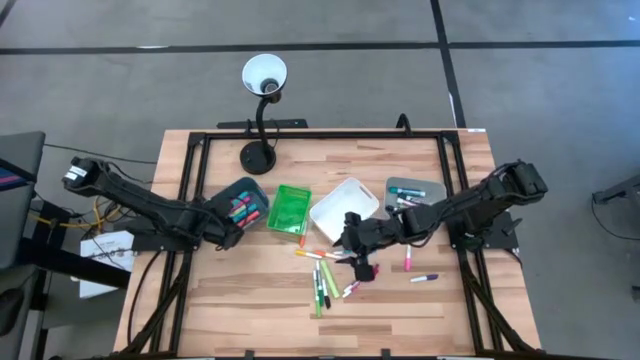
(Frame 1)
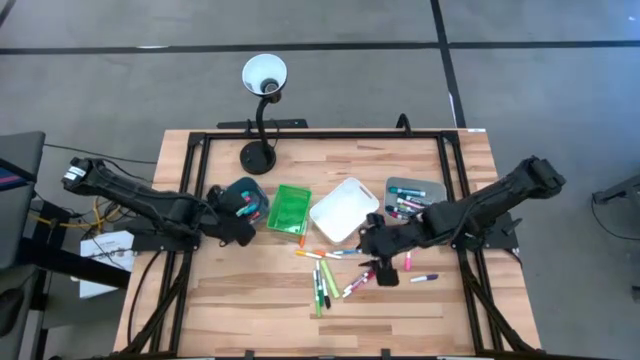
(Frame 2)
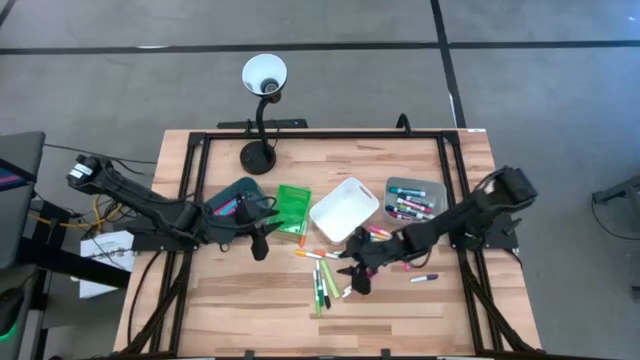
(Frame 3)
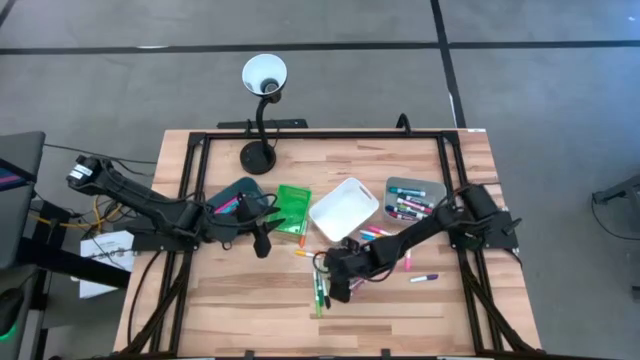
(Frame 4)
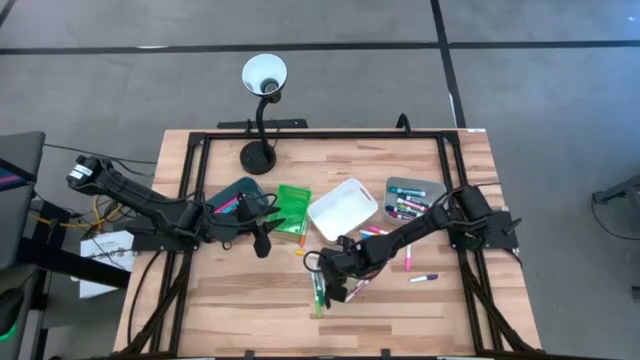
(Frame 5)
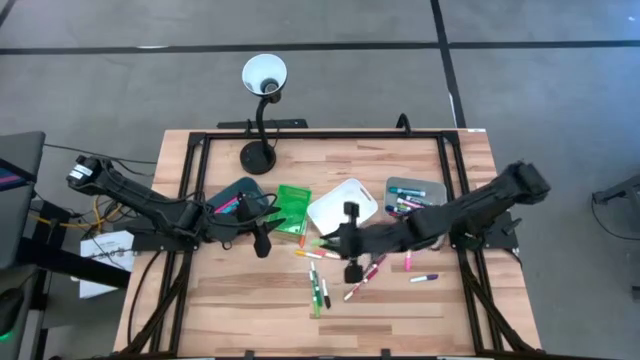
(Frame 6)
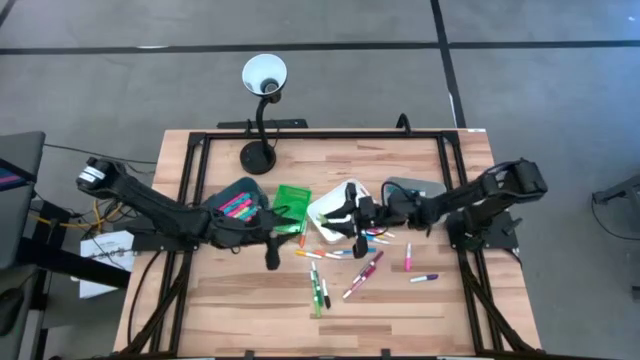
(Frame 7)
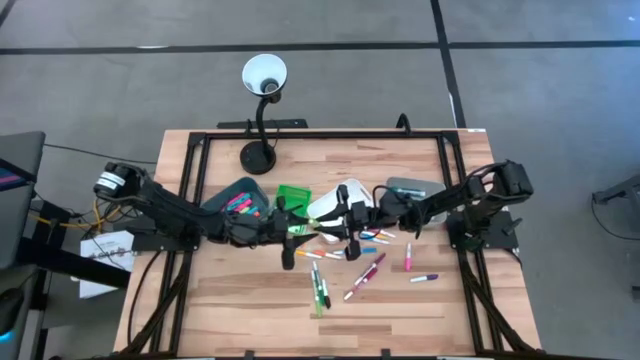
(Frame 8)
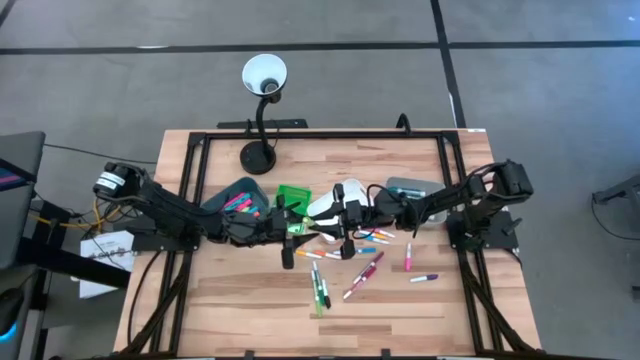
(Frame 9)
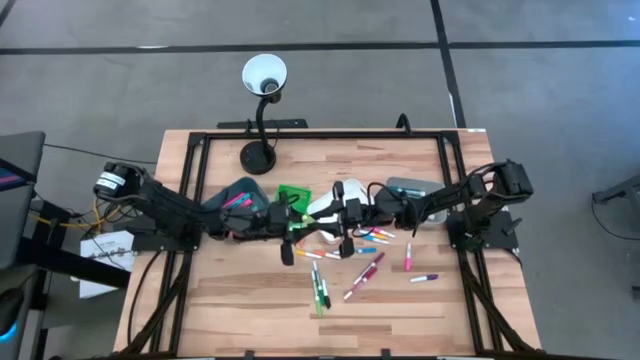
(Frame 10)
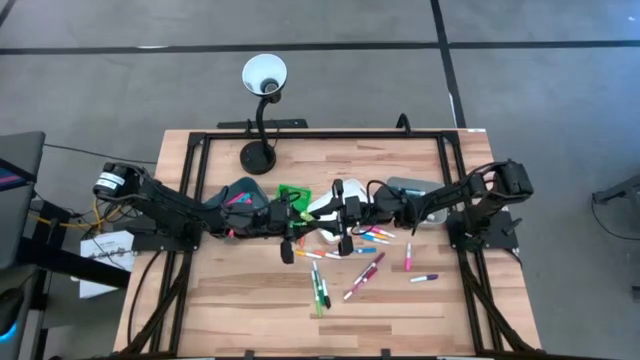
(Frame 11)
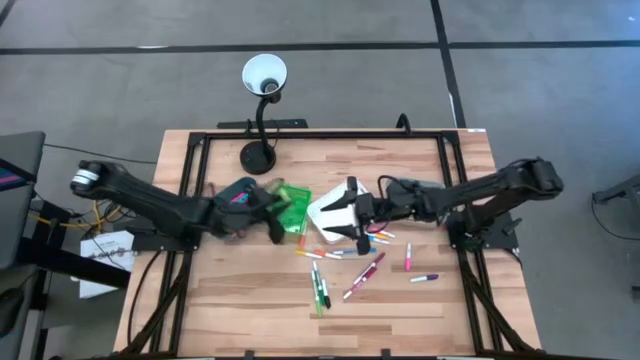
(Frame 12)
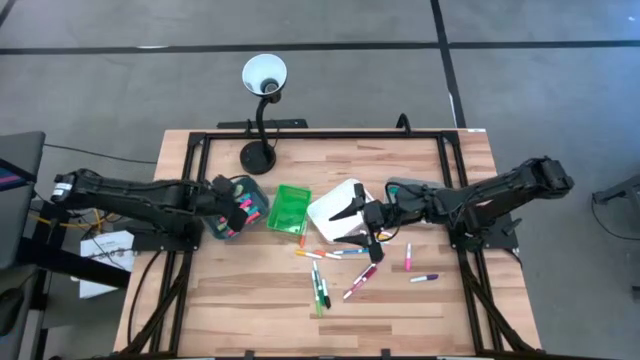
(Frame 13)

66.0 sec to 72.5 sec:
Task: Pick & Place Markers
Put the green highlighter pen into the blue bin

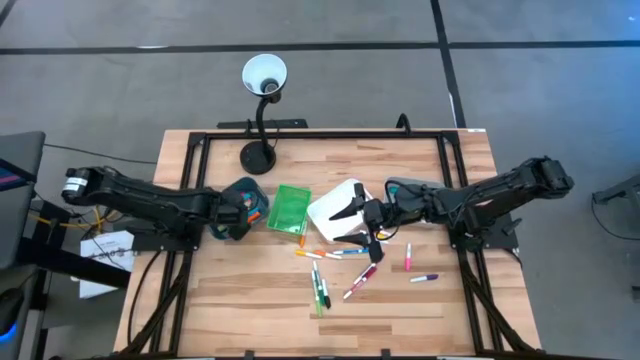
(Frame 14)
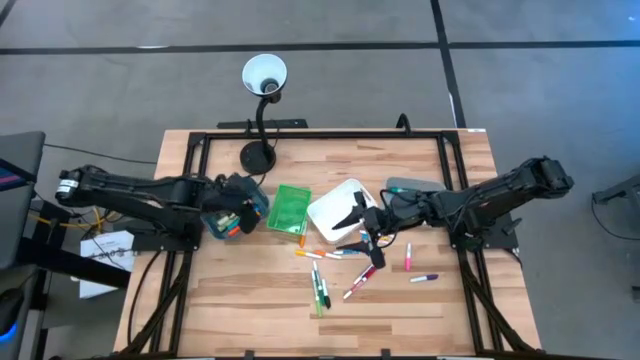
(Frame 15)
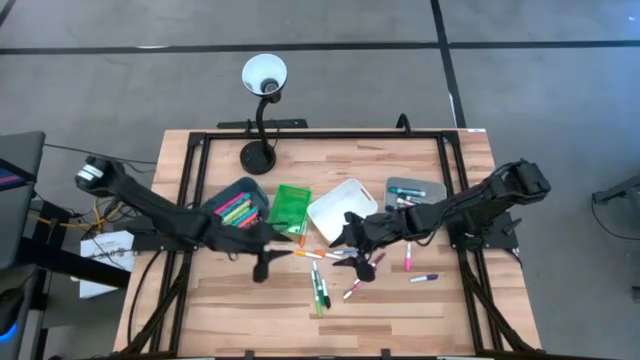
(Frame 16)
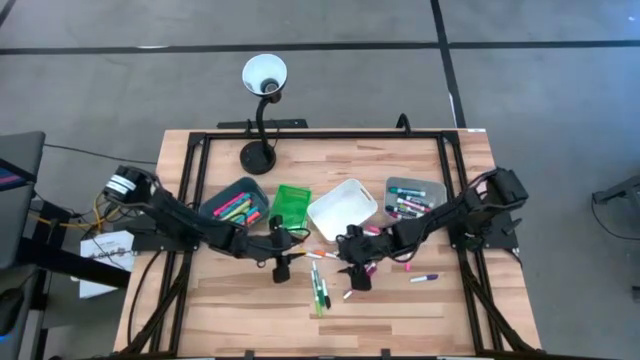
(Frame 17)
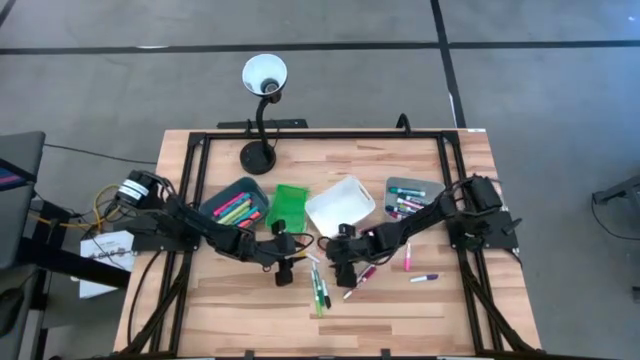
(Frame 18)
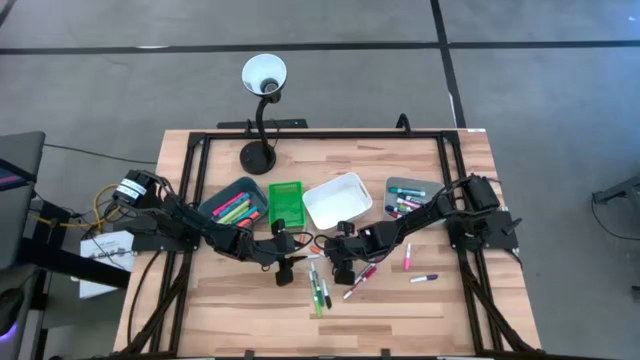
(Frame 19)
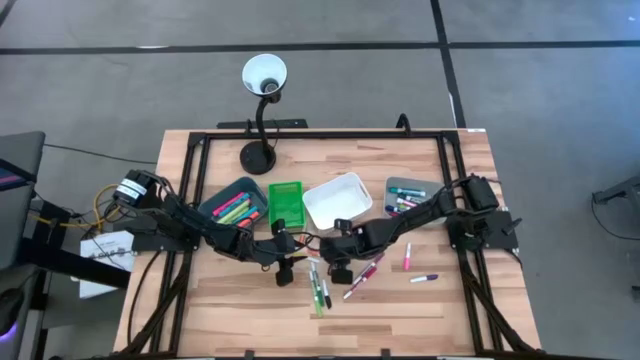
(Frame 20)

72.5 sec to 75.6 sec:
Put the orange and white highlighter pen into the green bin

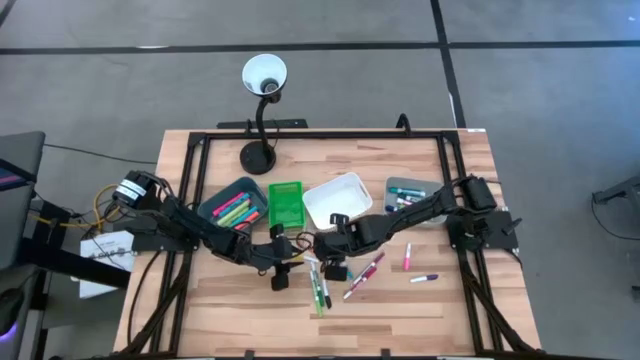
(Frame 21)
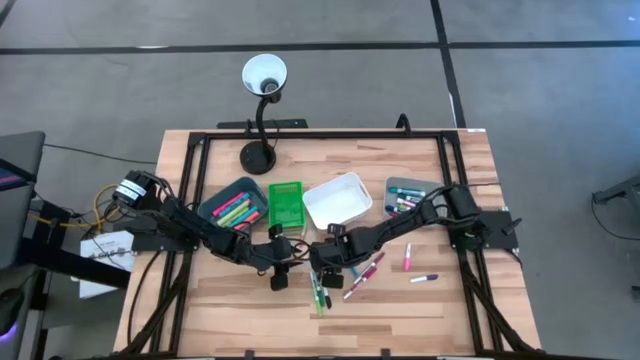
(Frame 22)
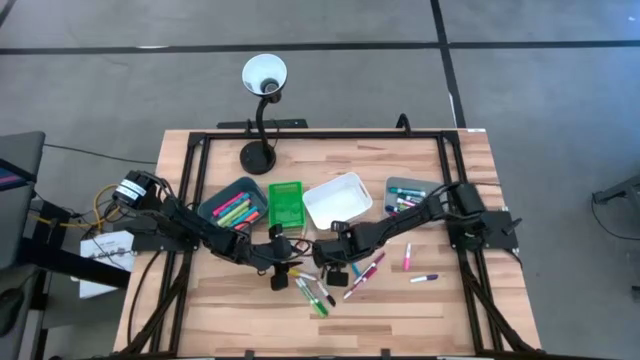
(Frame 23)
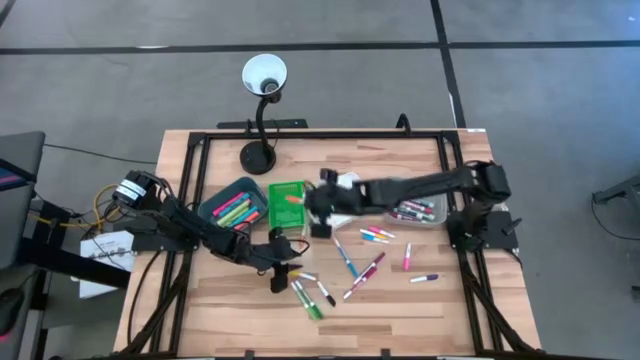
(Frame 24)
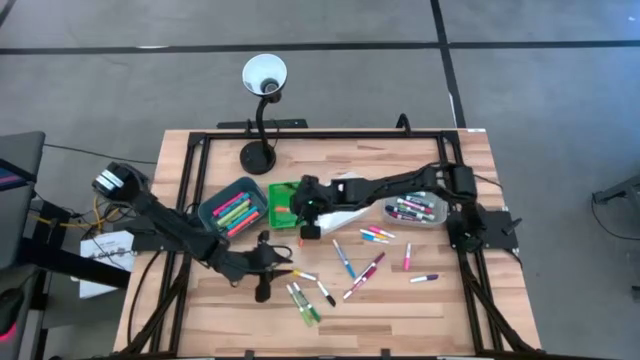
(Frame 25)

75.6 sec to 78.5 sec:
Put the orange and white highlighter pen into the green bin

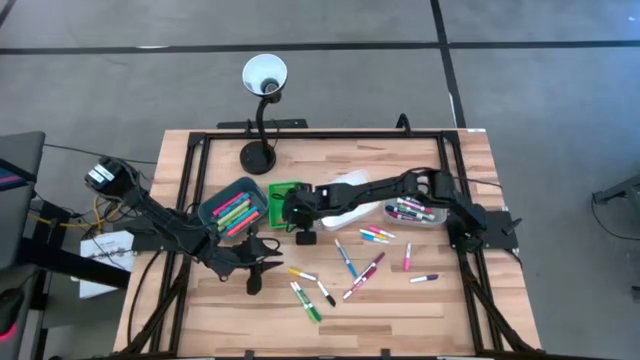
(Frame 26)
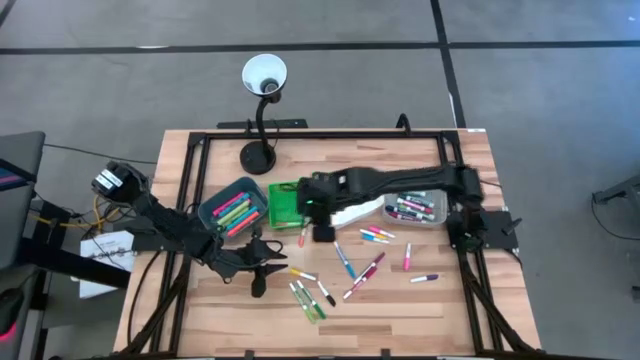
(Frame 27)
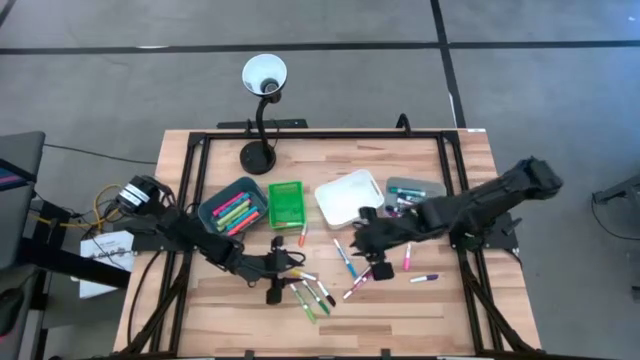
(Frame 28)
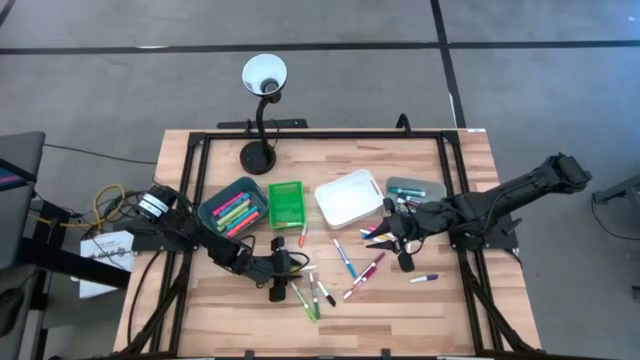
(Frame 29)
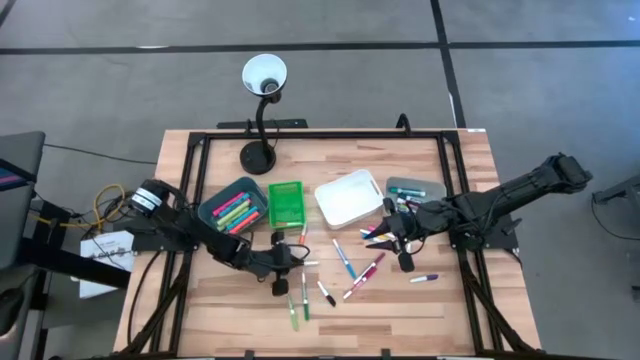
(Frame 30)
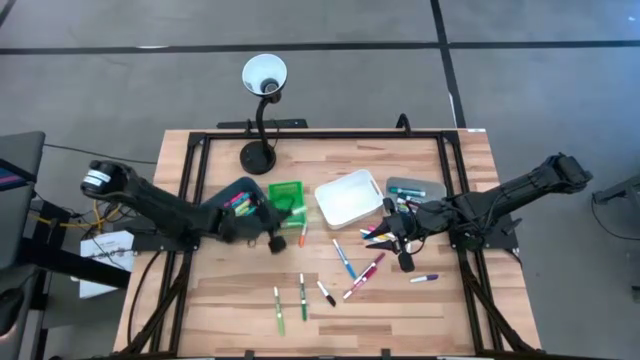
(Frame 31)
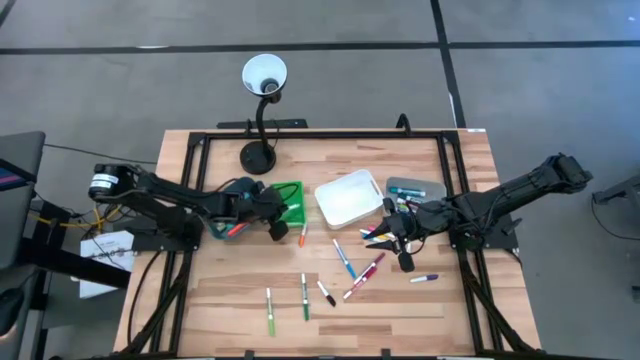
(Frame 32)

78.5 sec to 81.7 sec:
Put the yellow and white highlighter pen into the green bin

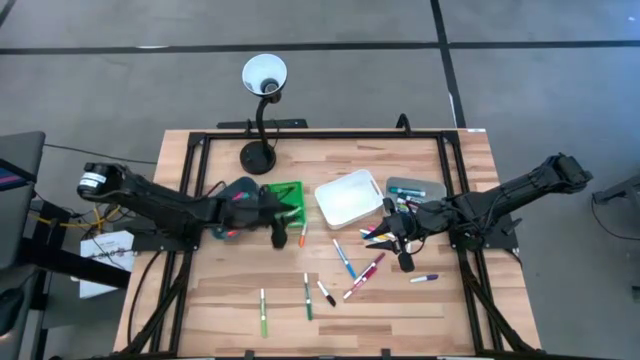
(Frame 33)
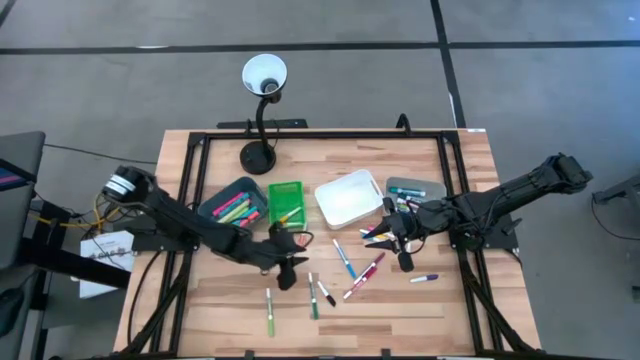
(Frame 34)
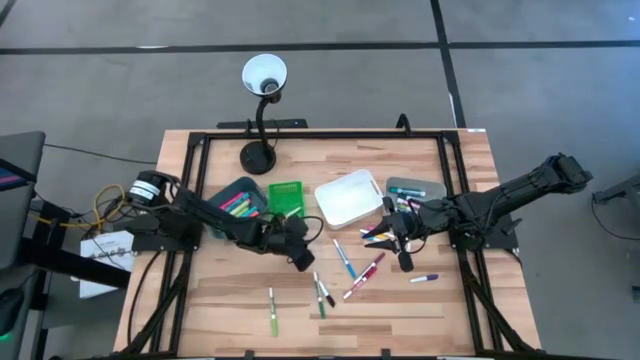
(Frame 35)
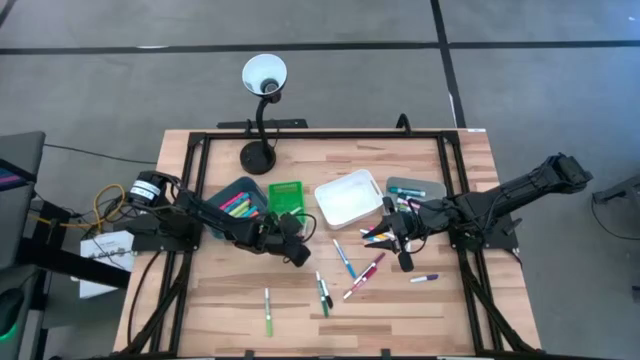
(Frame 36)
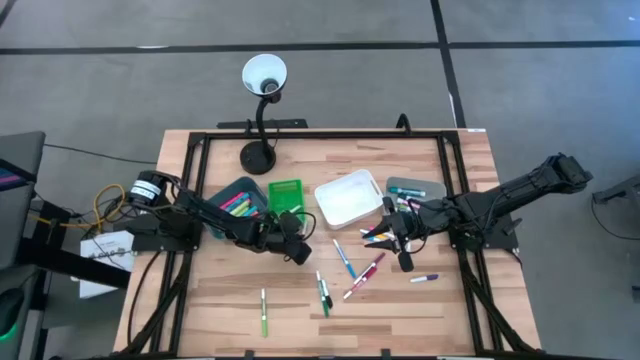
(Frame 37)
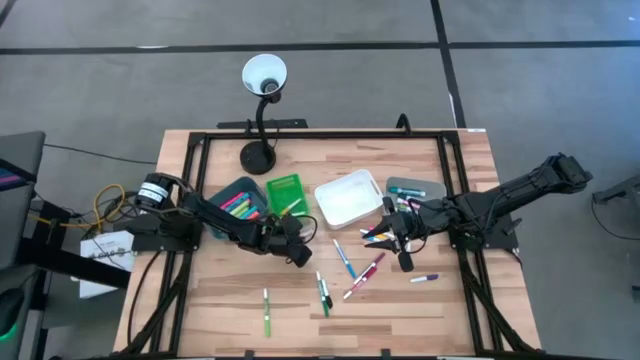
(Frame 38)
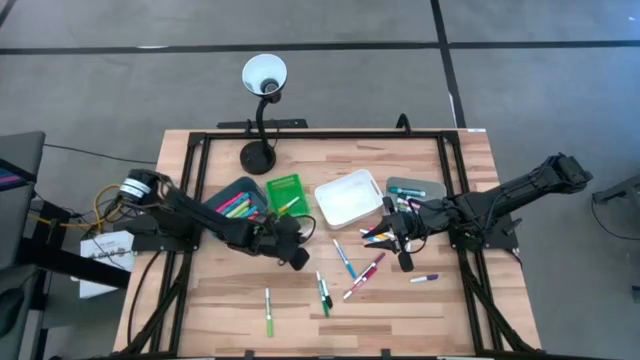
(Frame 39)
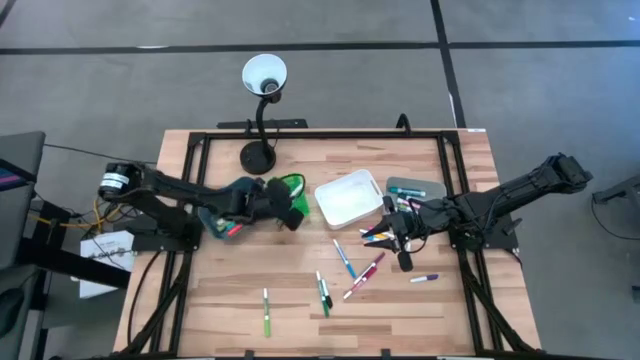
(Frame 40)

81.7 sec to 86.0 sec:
Put the orange and white highlighter pen into the green bin
